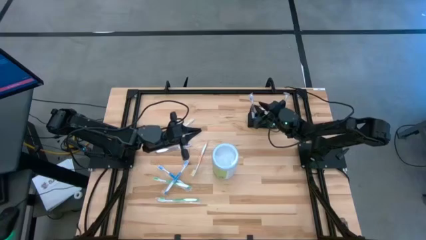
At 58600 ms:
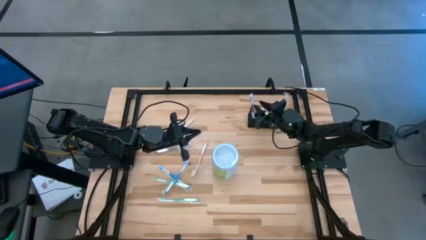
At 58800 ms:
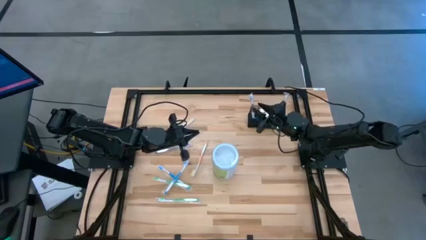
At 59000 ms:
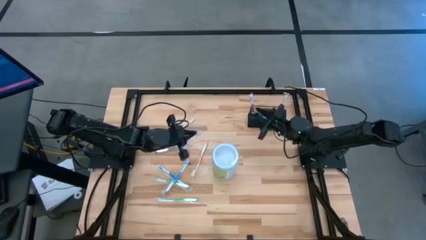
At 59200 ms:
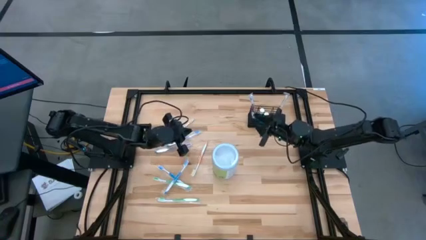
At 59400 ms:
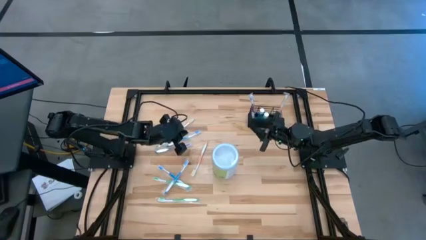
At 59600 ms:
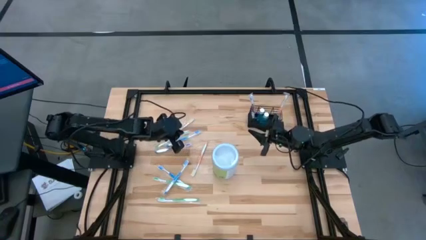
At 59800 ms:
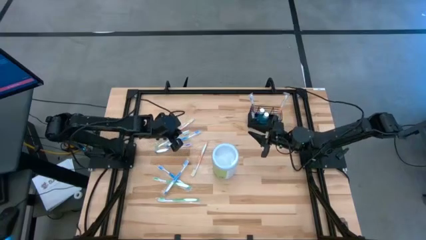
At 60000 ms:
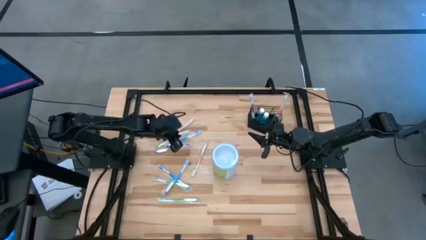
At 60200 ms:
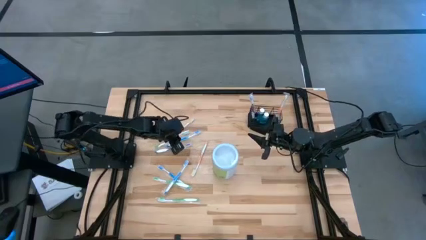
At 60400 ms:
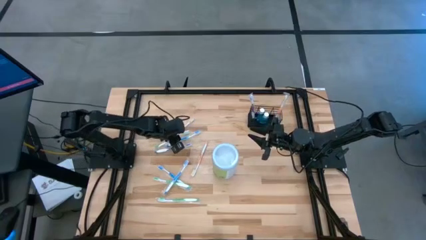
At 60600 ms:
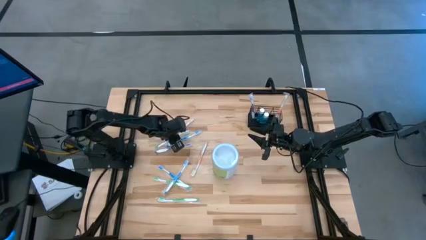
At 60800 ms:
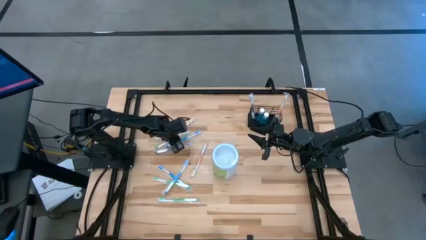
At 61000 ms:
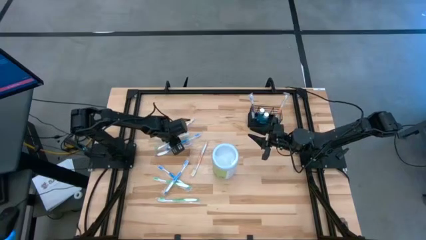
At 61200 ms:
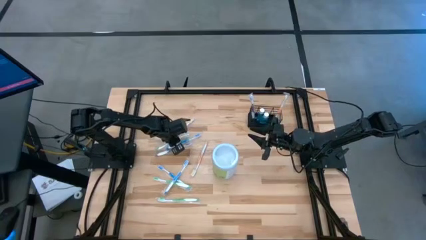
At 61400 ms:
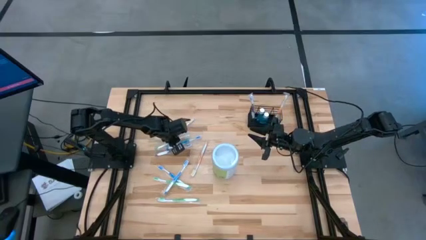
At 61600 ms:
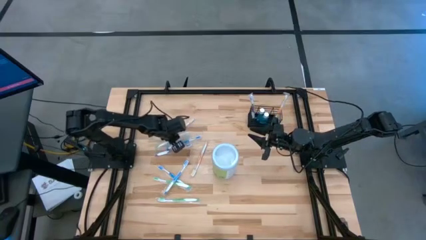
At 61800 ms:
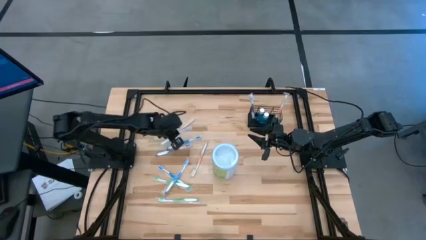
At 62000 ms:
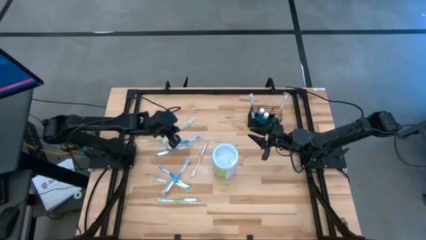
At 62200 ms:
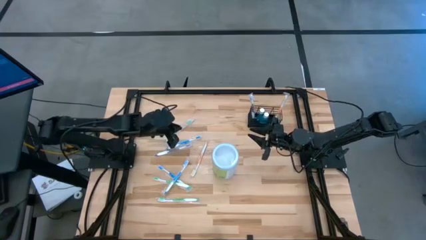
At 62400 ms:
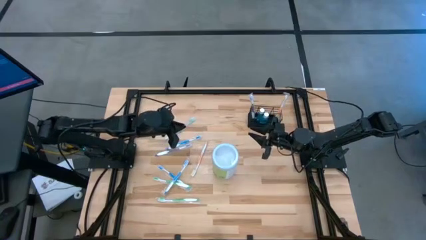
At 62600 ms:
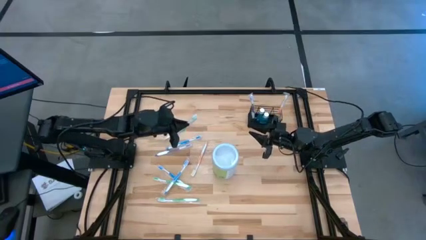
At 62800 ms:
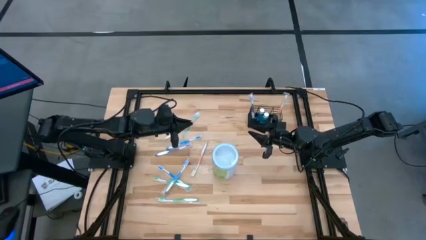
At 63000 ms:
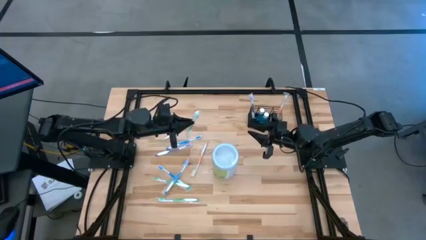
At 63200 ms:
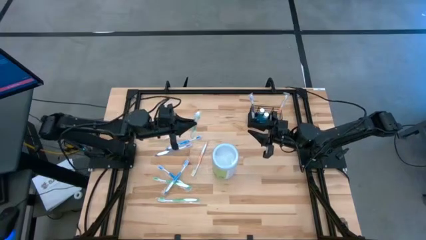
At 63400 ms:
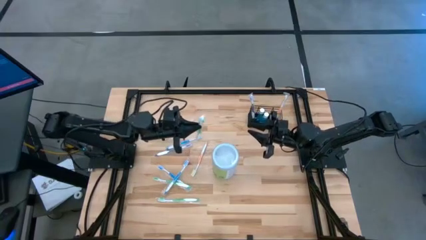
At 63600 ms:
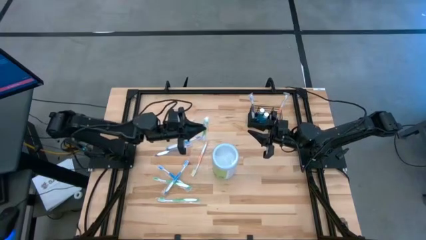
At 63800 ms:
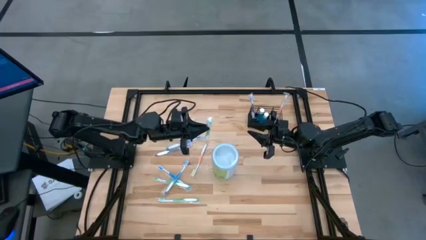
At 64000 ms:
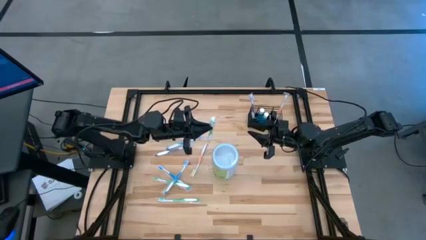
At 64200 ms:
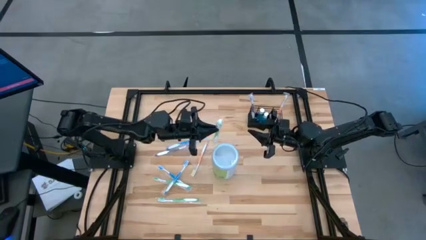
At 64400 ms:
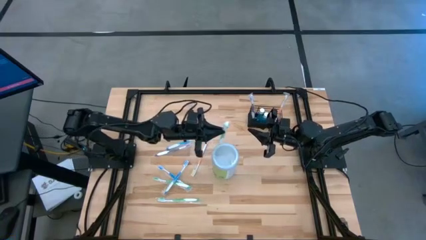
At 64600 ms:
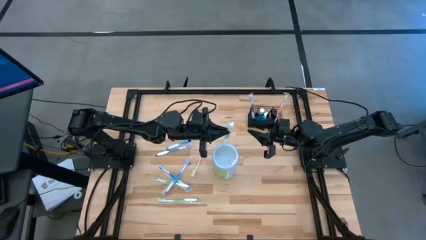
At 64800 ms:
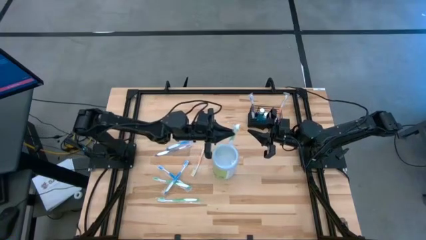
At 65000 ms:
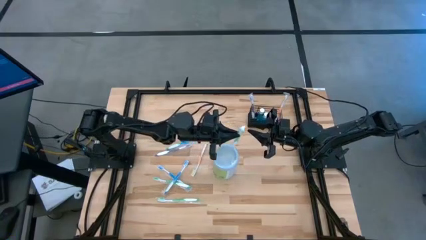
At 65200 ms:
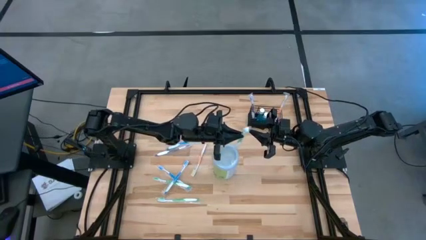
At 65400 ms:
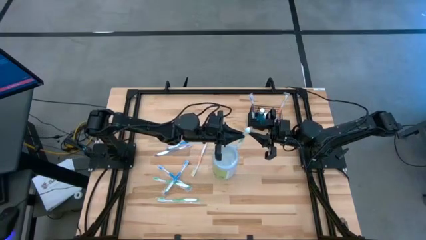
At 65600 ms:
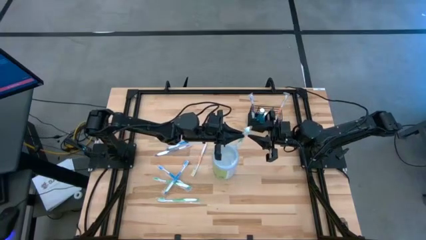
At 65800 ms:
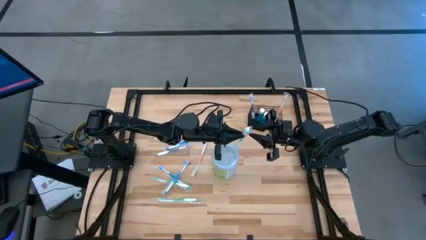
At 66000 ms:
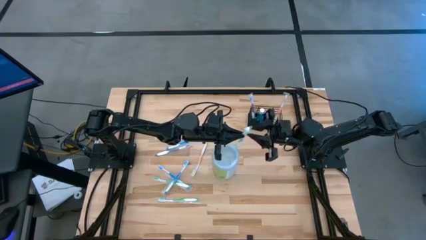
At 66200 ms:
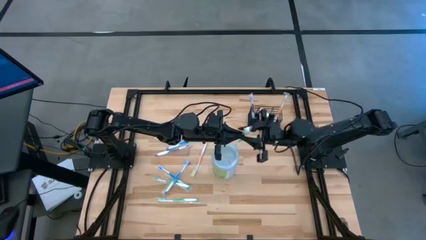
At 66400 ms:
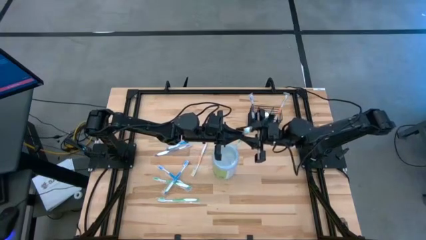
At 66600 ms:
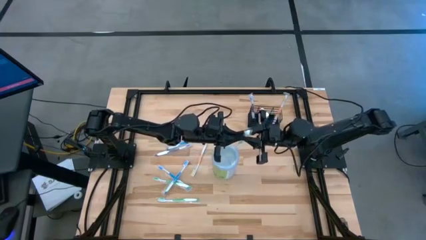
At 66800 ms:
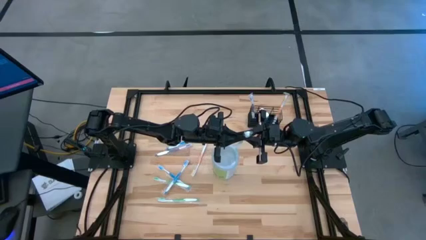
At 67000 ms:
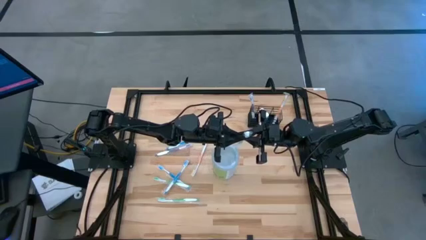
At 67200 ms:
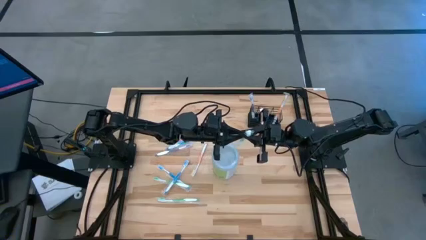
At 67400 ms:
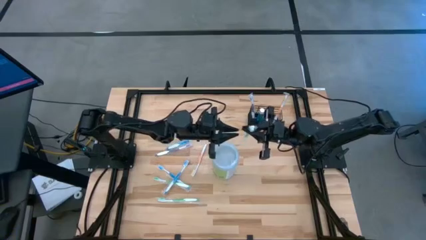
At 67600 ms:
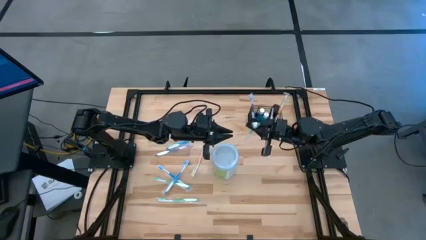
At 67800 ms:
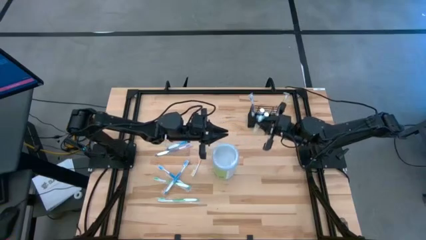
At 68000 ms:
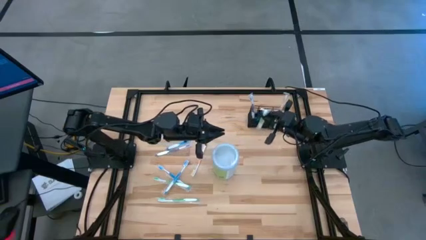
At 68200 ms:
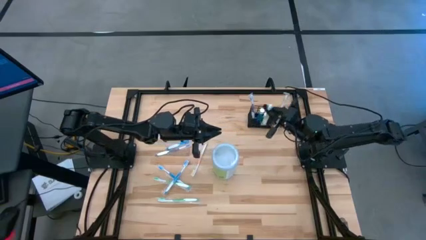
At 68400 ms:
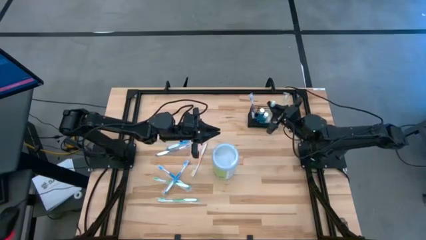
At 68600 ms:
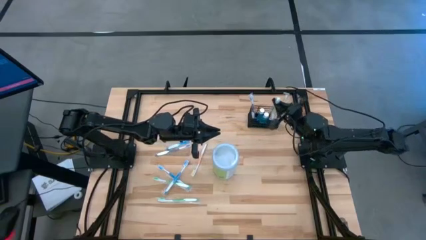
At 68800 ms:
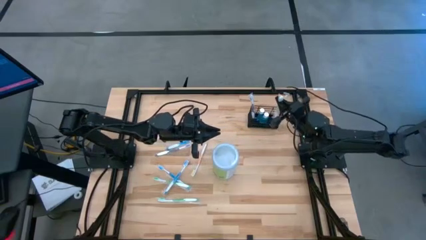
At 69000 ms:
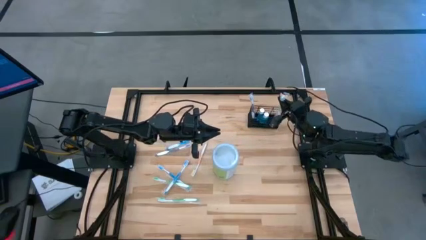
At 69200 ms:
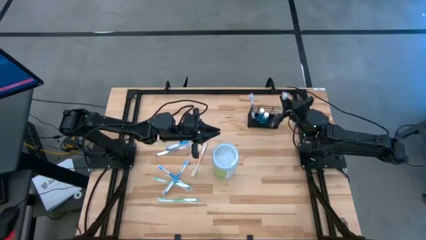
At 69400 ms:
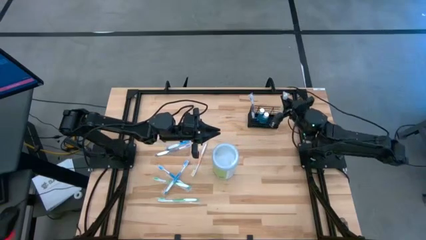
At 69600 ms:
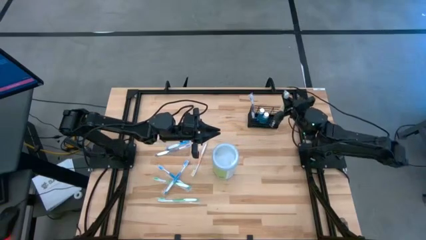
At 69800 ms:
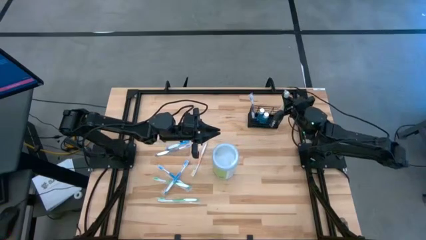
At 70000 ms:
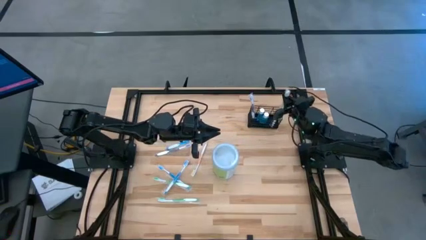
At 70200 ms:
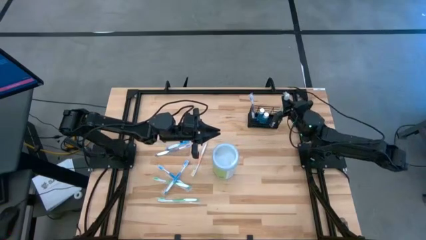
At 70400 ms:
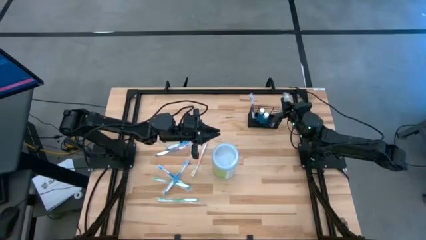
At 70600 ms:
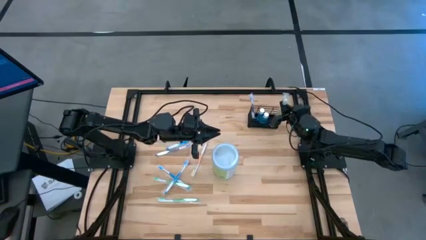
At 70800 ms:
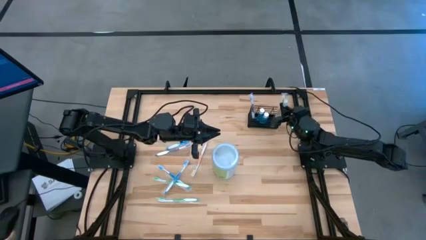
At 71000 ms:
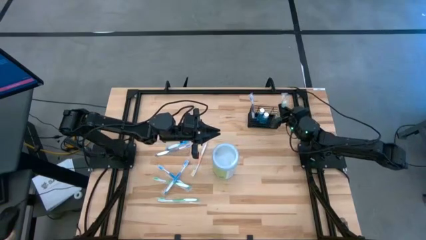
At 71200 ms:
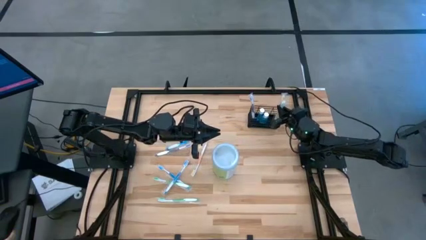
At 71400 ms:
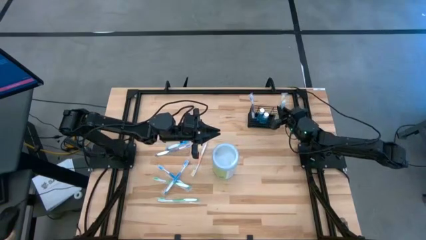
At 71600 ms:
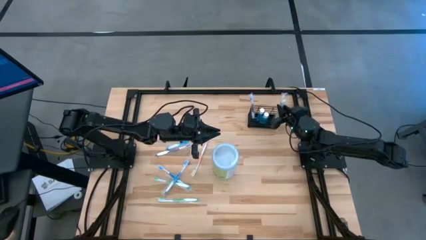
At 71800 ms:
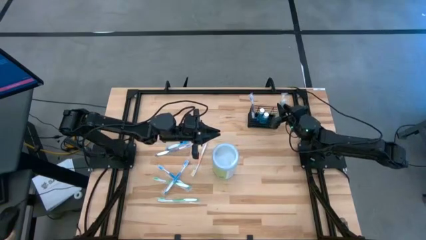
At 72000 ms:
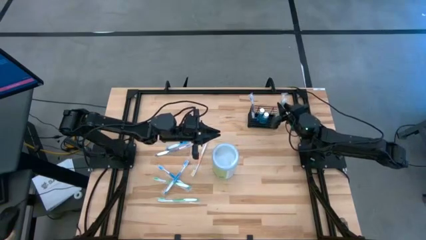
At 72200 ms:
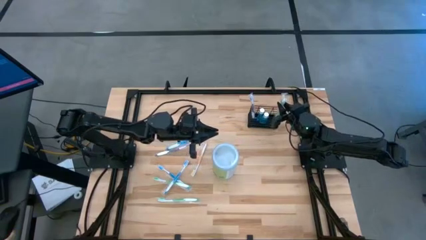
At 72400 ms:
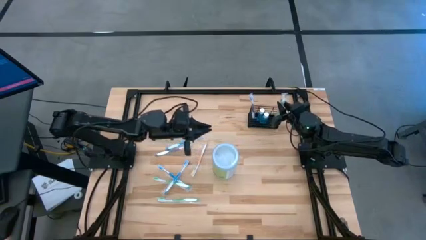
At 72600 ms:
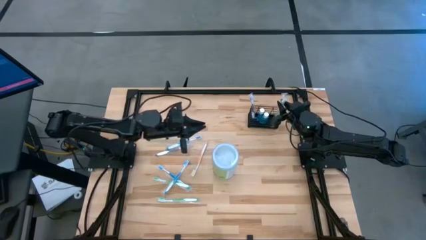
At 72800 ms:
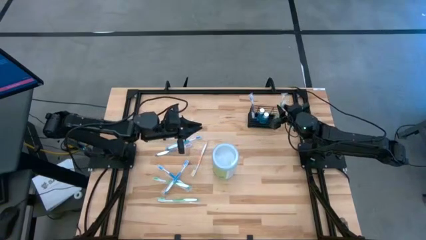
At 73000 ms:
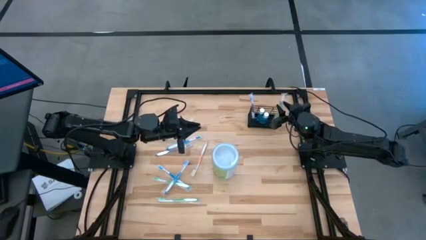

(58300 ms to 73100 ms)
Task: Pick & Place toothbrushing station
Put the green toothbrush into the wire organizer
